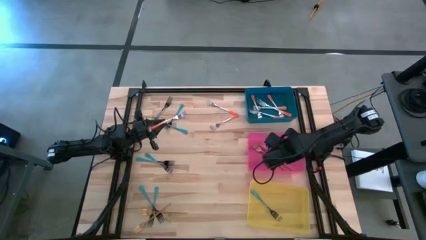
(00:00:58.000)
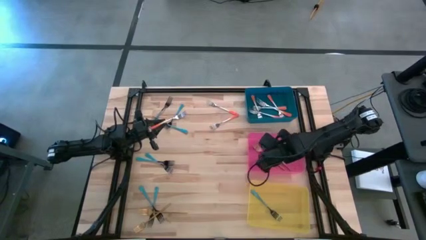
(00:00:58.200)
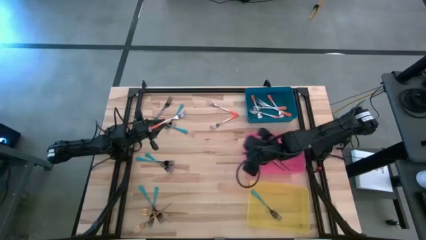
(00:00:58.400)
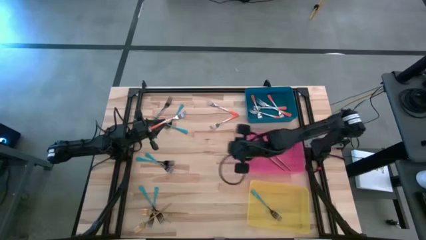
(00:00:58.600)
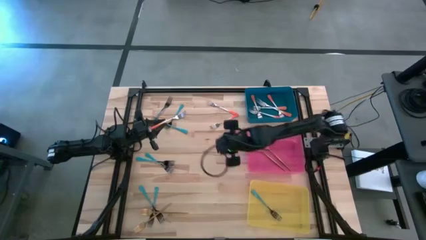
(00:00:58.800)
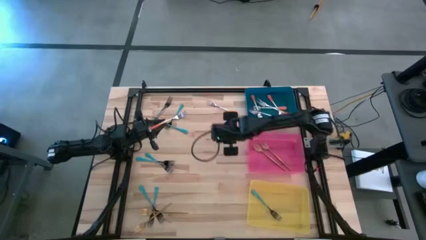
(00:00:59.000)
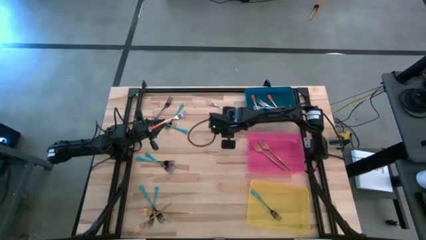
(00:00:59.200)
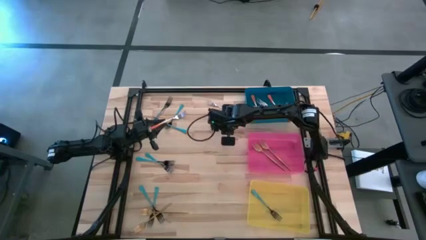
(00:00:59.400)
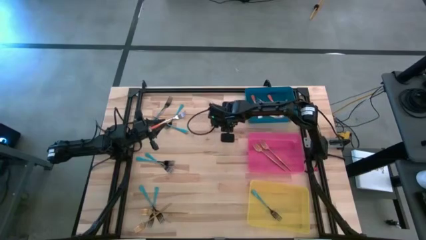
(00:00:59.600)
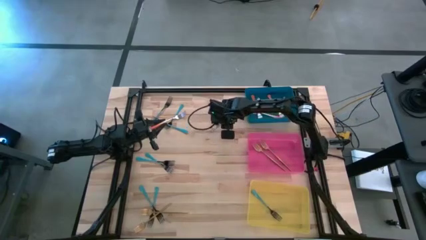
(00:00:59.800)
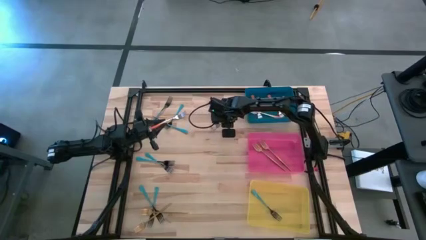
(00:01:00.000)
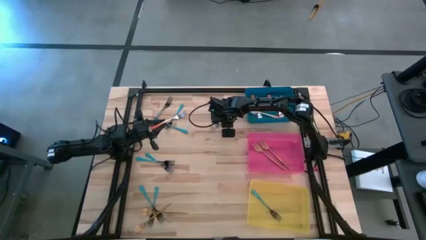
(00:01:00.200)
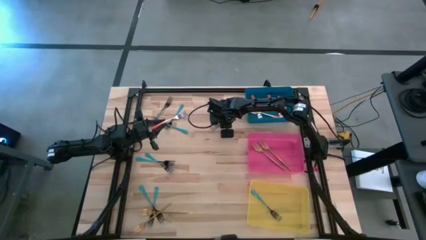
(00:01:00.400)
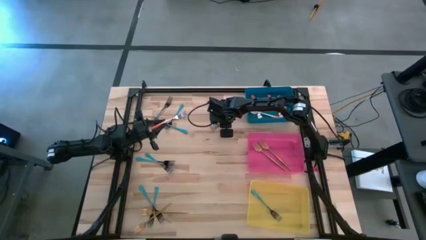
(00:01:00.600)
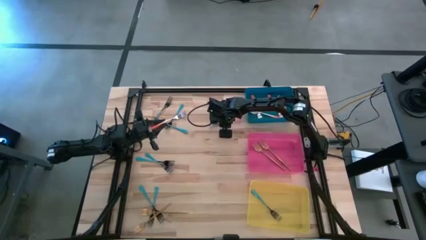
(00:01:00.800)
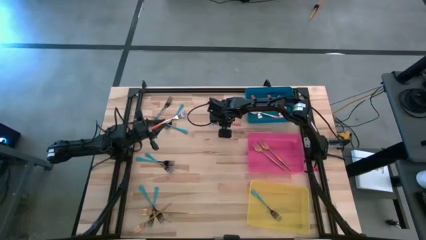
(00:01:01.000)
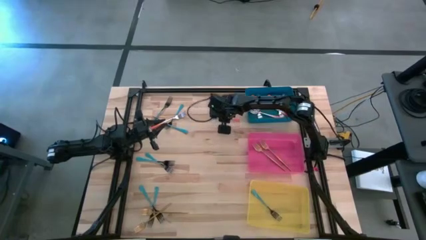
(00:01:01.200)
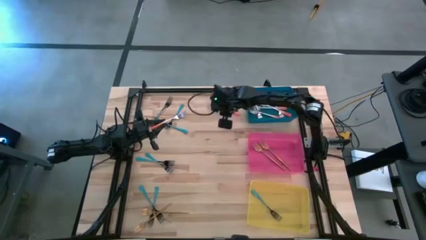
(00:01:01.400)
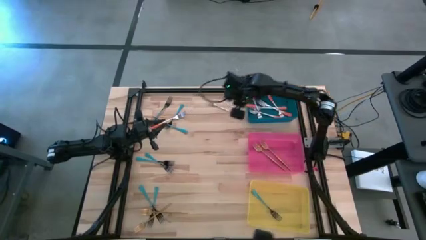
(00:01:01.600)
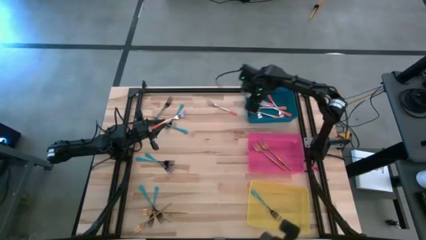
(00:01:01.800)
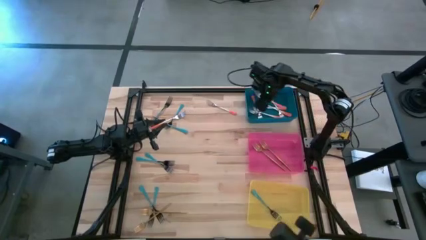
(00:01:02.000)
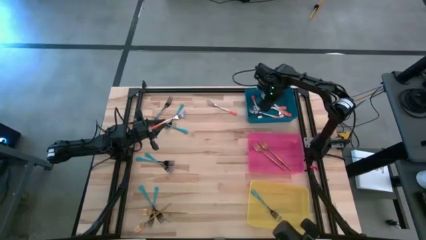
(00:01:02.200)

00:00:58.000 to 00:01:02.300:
Task: Sort silverware by color (type)
Put the orange fork into the blue bin

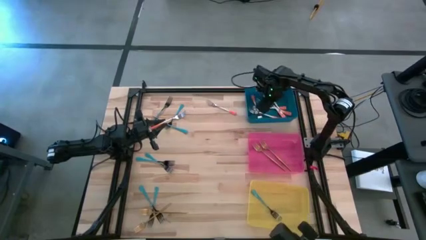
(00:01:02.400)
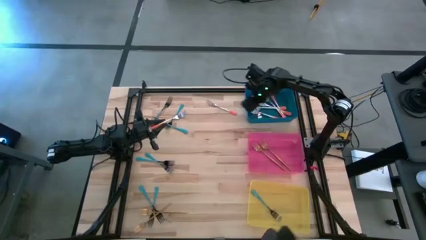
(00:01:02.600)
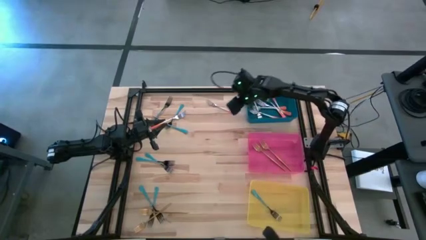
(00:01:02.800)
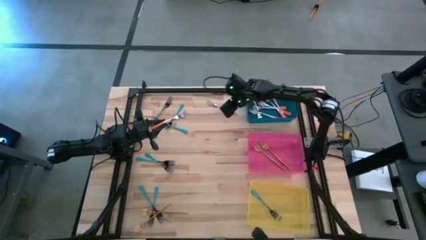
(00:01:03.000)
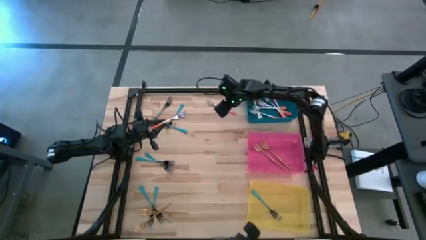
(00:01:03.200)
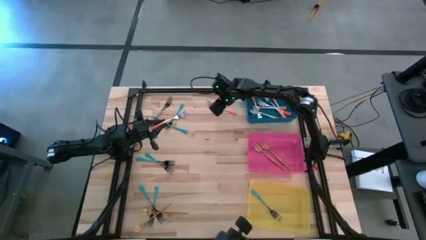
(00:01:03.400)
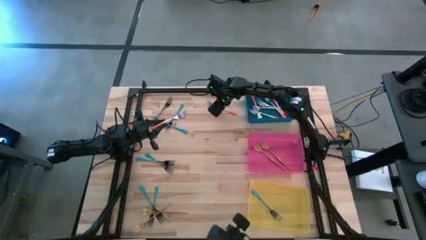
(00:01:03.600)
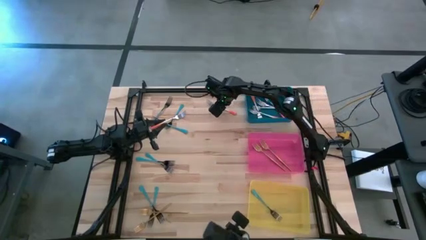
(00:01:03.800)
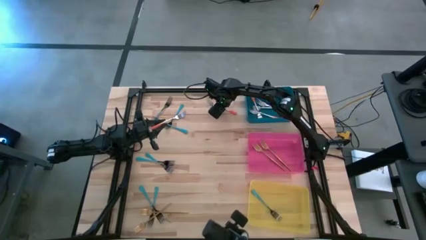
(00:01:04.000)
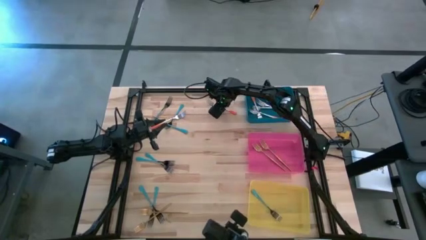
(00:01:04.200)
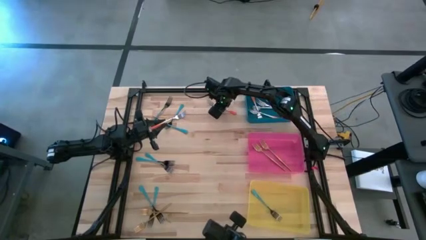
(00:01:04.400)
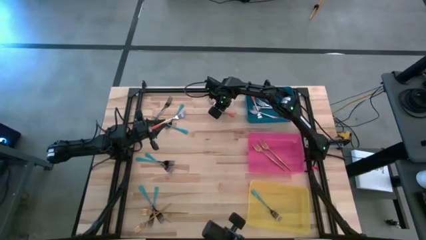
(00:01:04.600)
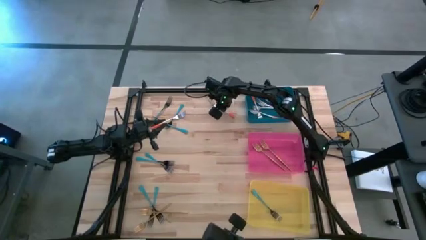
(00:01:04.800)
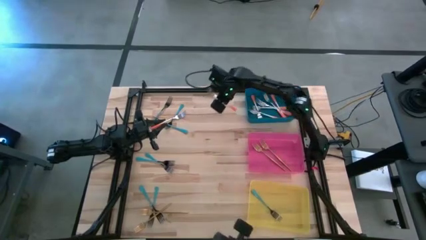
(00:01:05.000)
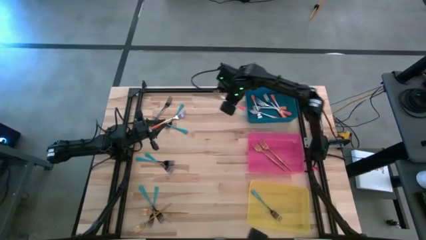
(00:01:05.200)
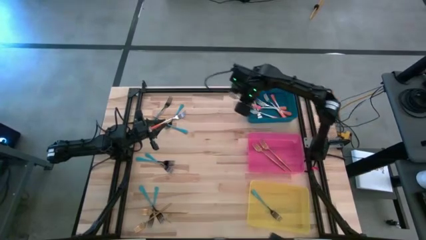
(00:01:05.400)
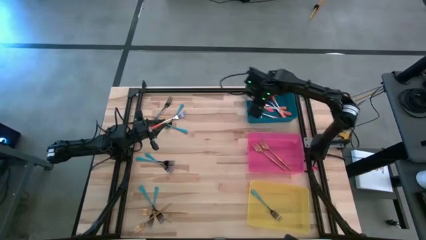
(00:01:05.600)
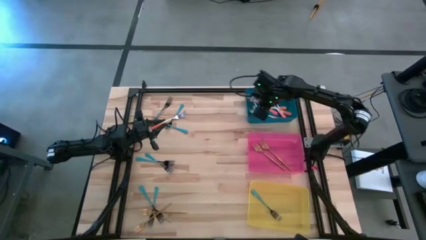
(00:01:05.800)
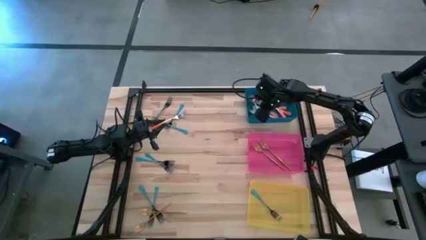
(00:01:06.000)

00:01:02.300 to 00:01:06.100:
Put the orange fork into the blue bin

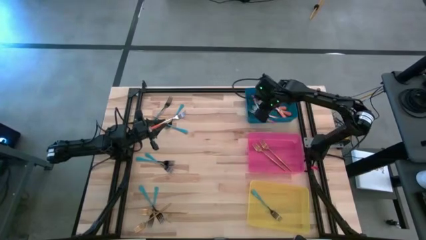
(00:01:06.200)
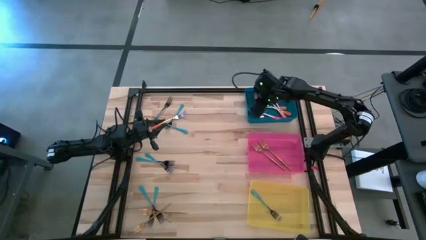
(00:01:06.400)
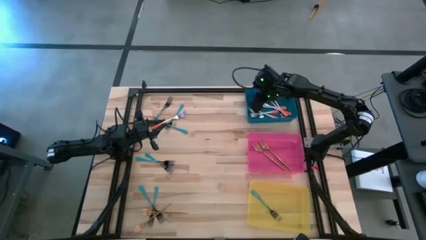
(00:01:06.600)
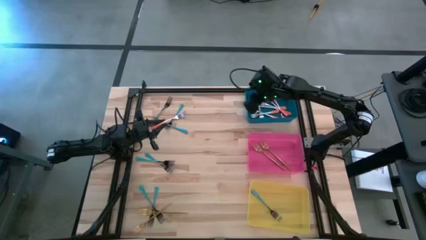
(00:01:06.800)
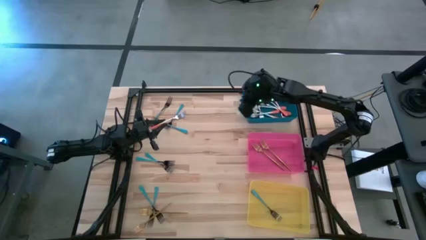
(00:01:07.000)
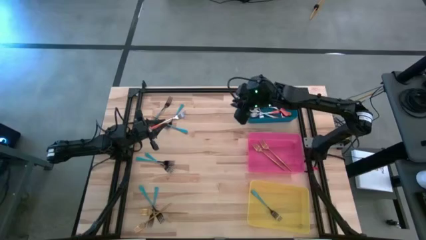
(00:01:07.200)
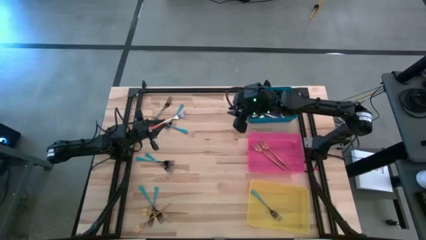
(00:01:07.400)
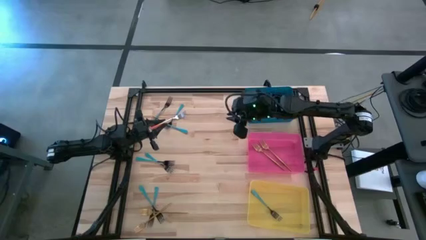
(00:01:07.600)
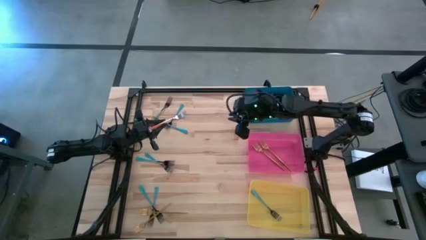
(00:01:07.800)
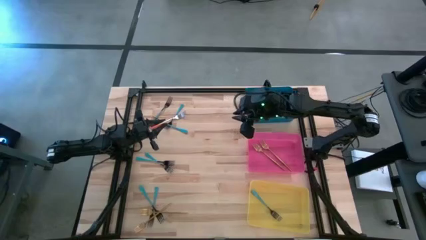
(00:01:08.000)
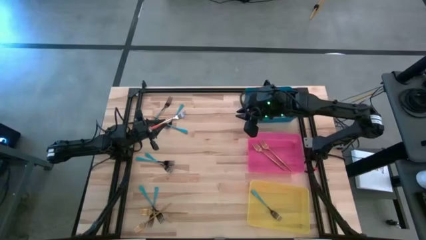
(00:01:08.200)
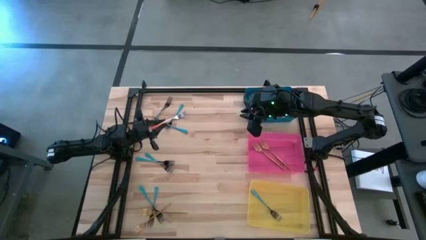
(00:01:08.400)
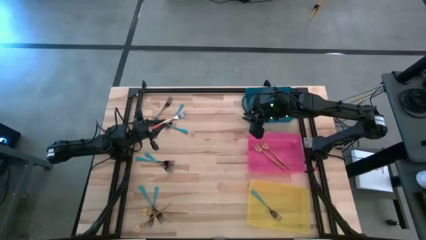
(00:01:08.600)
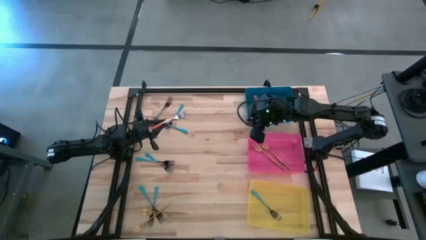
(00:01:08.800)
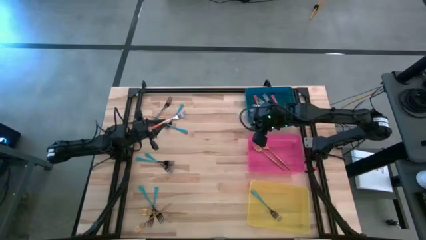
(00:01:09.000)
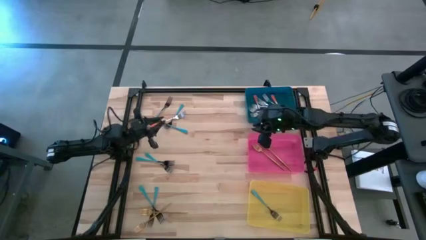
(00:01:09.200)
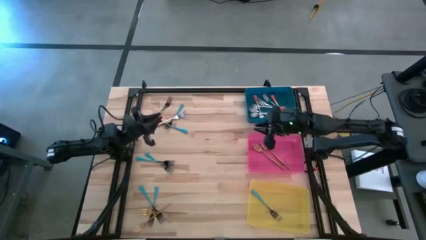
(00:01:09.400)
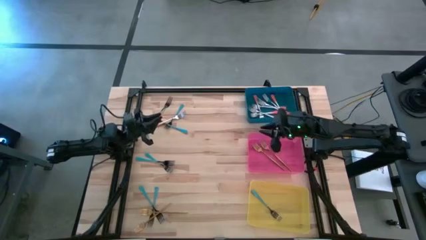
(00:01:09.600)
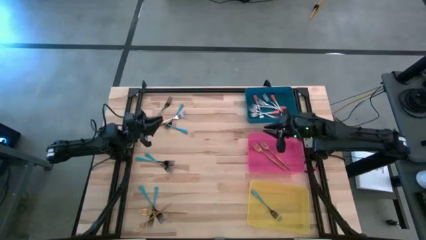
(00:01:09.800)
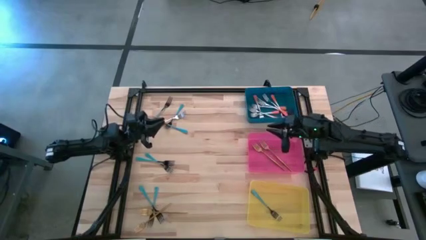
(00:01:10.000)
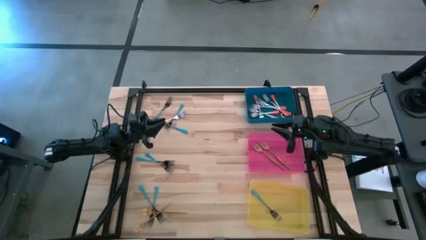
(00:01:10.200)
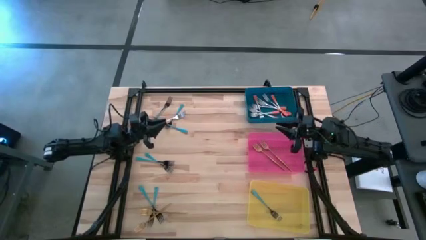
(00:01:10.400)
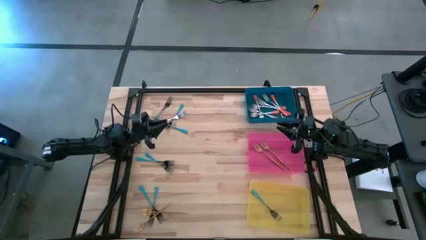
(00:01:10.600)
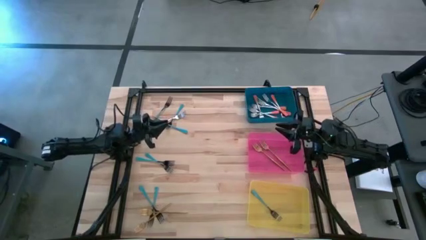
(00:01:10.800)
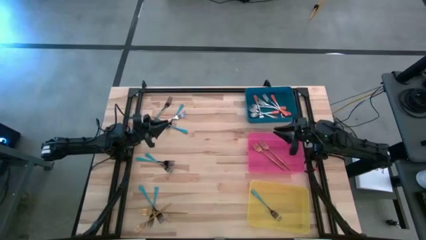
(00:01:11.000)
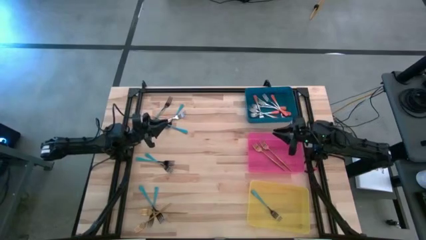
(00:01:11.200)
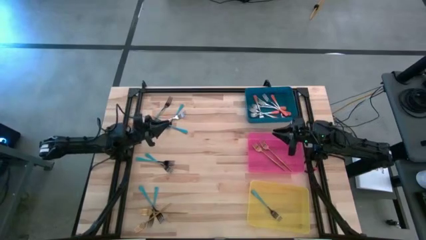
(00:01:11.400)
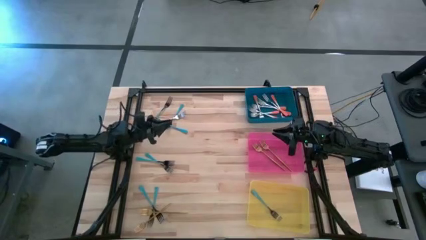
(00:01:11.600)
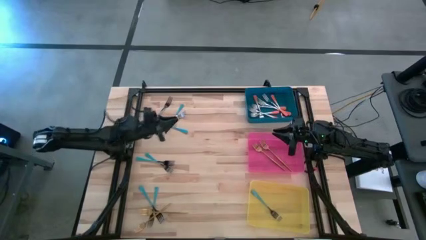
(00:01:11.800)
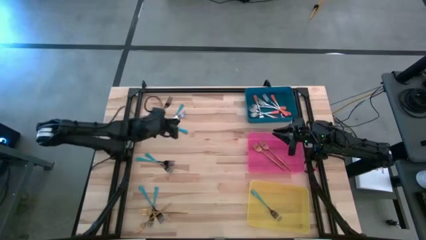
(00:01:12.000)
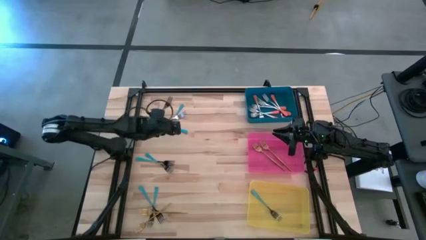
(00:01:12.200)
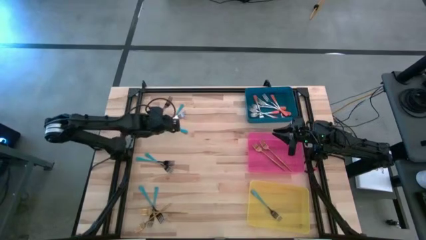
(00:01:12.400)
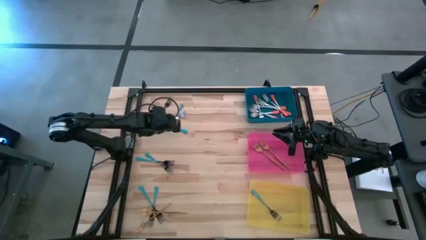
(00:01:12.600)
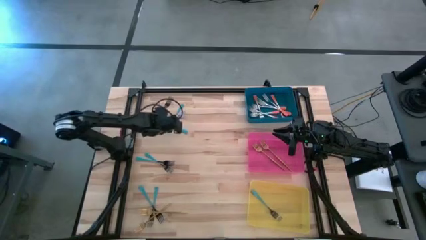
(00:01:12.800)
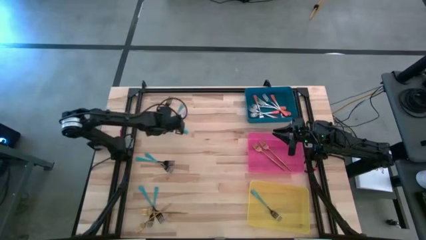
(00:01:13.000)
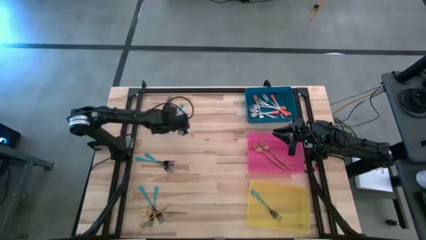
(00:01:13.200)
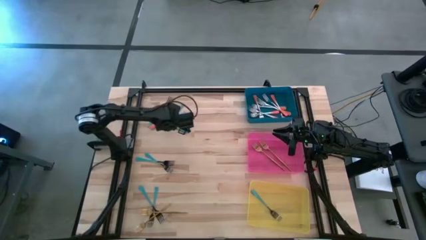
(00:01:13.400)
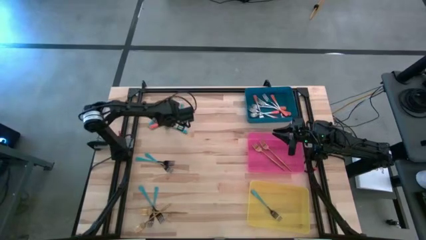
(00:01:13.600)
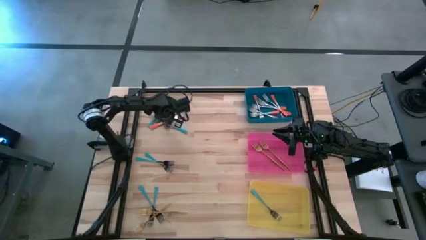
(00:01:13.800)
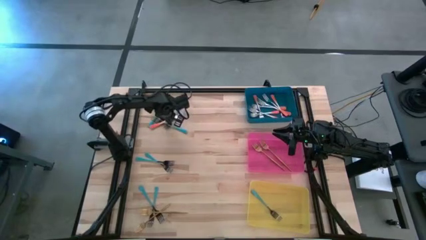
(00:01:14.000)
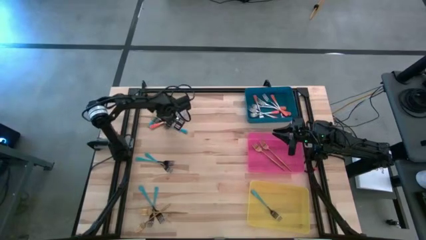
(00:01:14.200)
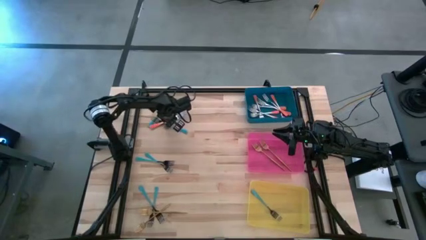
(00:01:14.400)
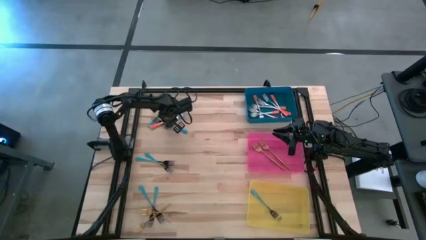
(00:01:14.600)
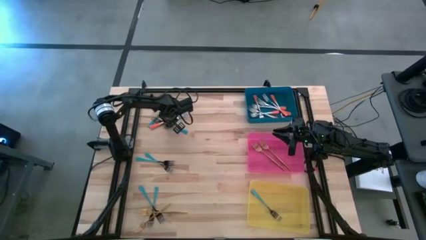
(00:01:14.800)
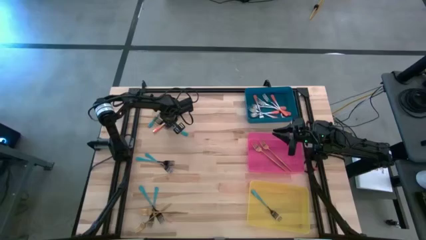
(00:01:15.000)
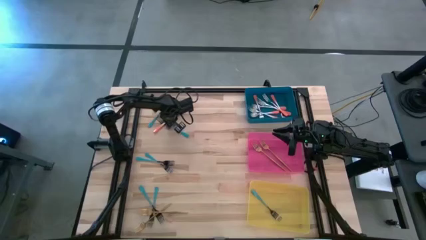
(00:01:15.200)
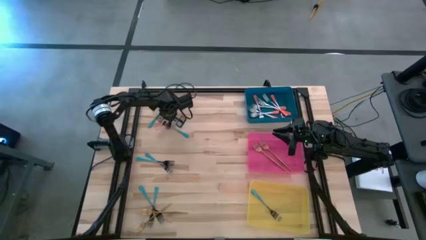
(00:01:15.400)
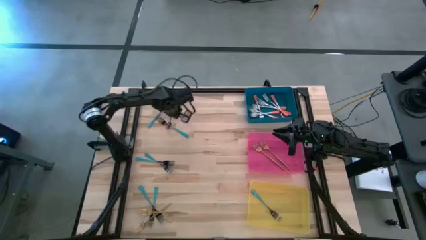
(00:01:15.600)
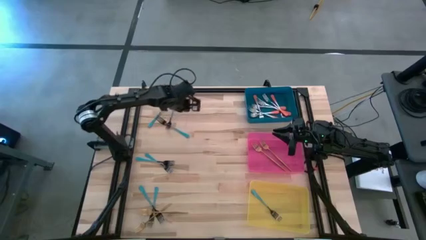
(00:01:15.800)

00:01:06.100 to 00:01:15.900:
Put the orange fork into the blue bin
